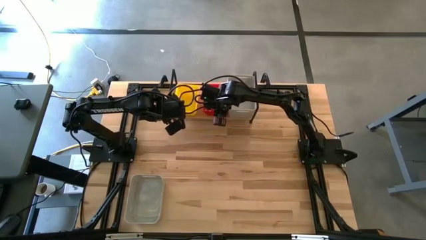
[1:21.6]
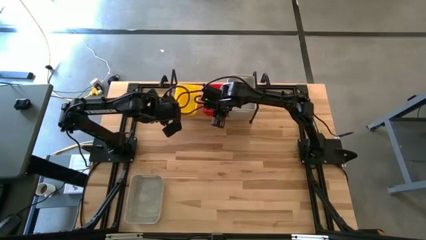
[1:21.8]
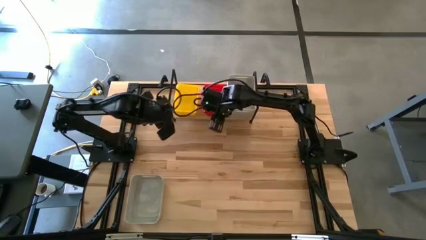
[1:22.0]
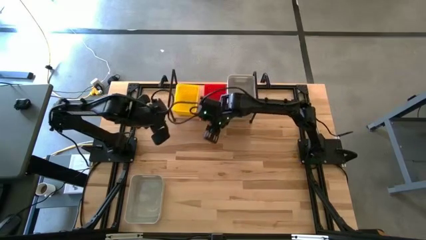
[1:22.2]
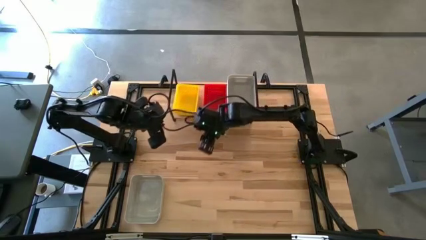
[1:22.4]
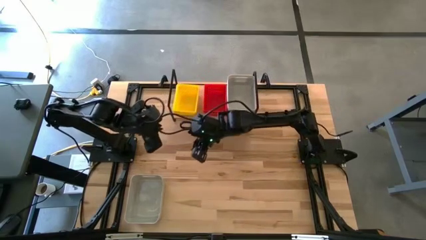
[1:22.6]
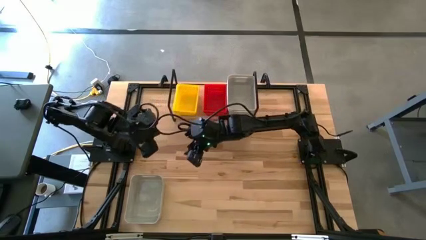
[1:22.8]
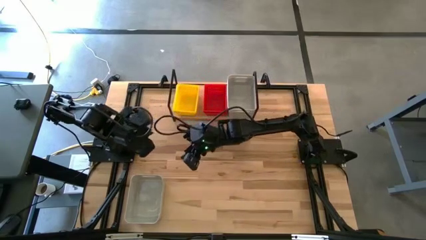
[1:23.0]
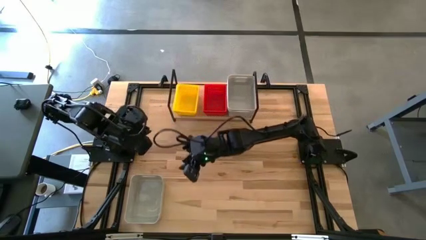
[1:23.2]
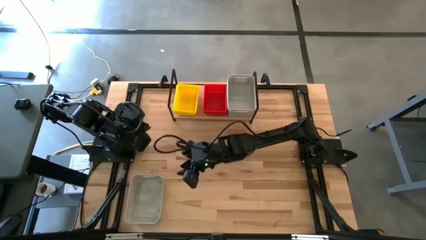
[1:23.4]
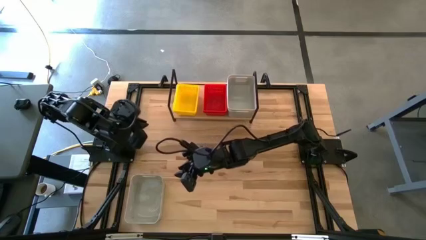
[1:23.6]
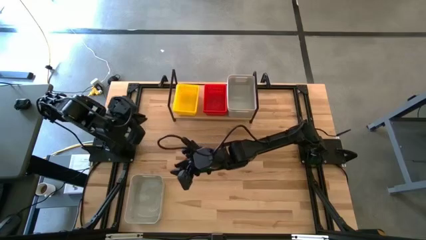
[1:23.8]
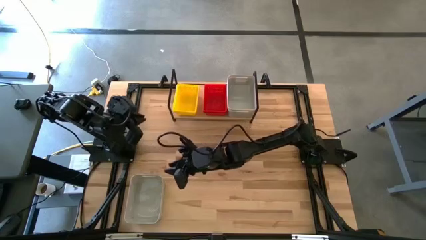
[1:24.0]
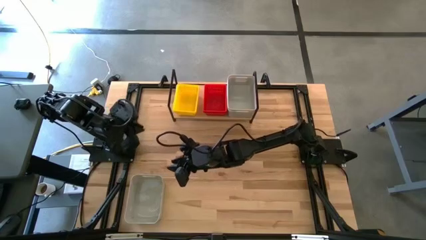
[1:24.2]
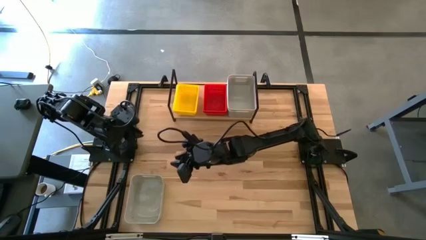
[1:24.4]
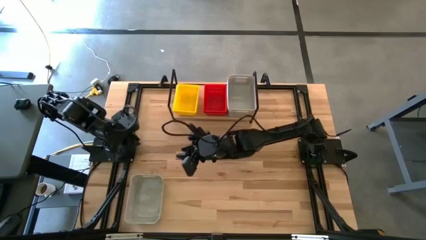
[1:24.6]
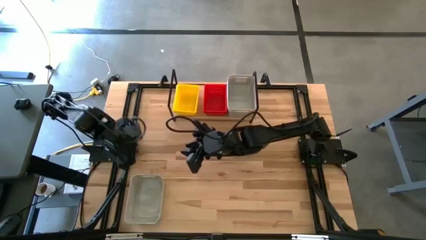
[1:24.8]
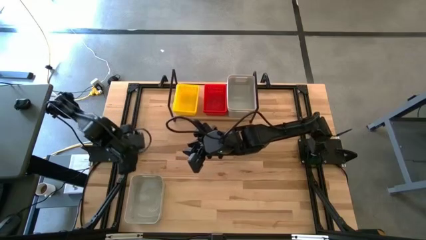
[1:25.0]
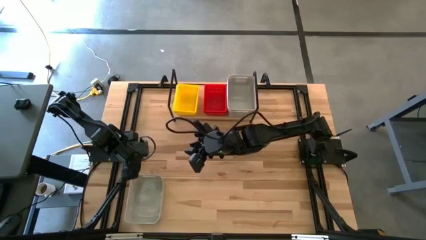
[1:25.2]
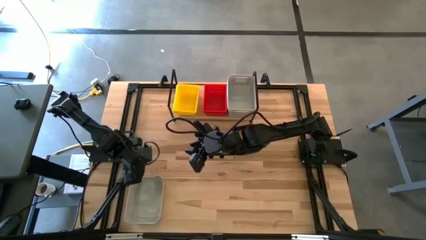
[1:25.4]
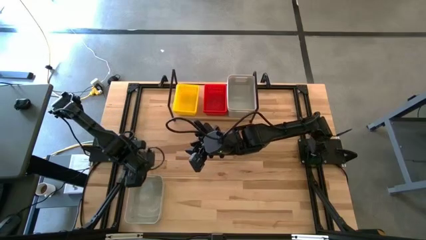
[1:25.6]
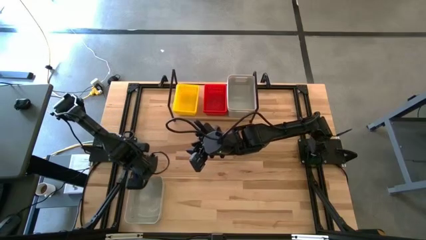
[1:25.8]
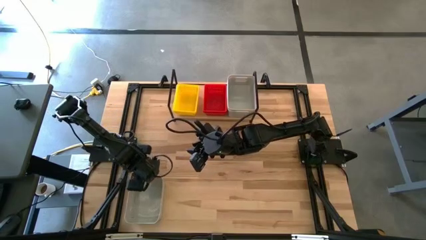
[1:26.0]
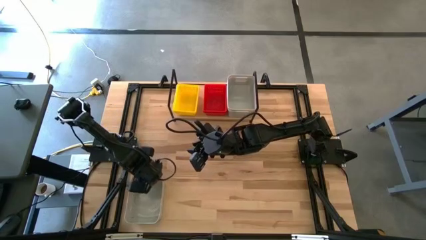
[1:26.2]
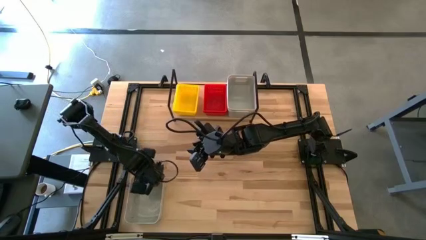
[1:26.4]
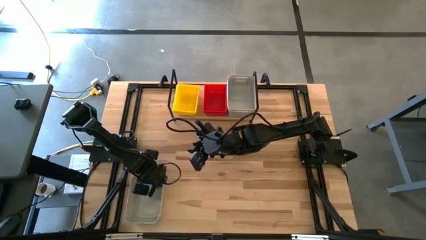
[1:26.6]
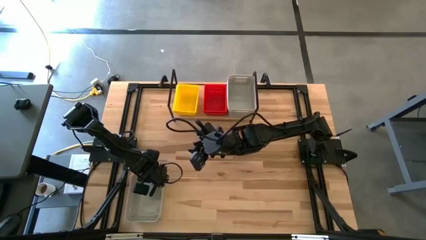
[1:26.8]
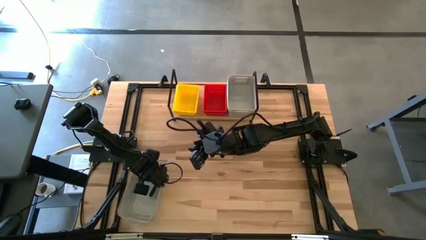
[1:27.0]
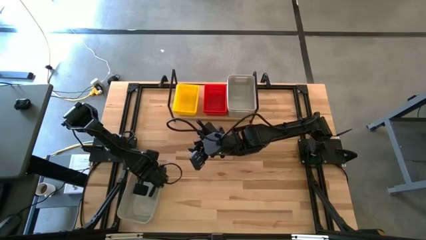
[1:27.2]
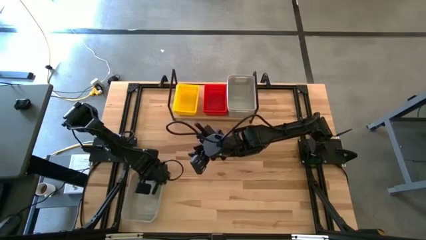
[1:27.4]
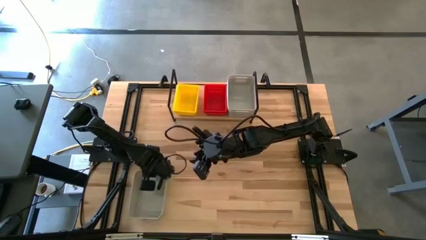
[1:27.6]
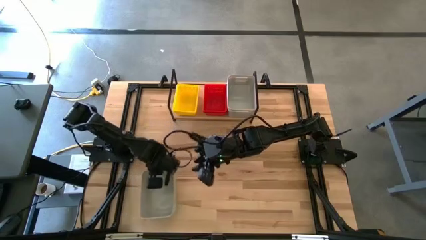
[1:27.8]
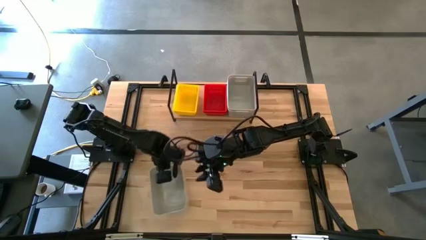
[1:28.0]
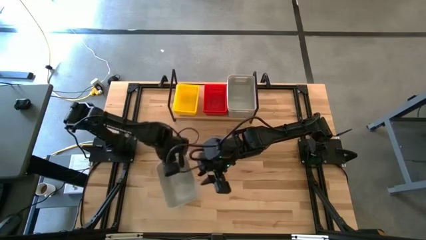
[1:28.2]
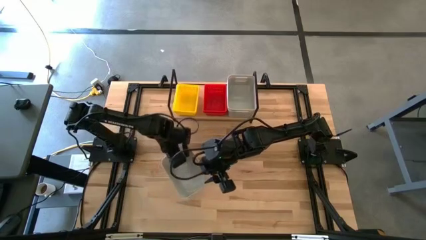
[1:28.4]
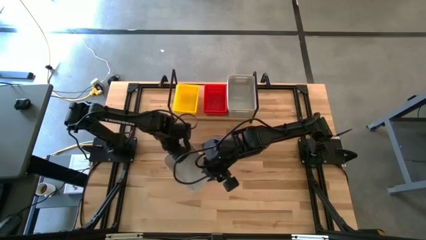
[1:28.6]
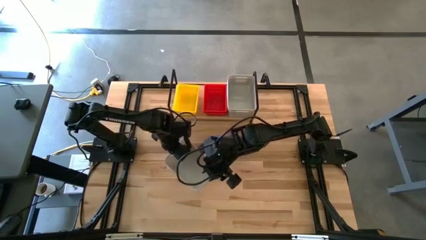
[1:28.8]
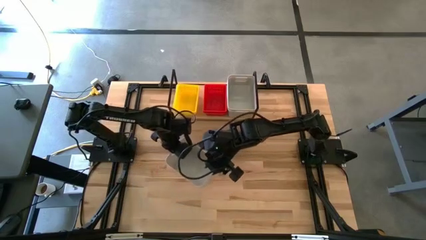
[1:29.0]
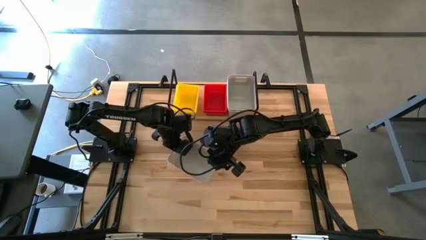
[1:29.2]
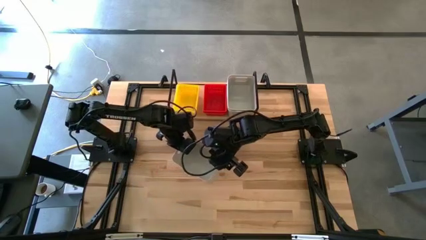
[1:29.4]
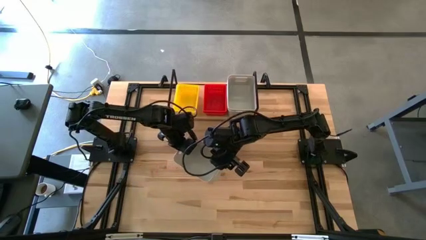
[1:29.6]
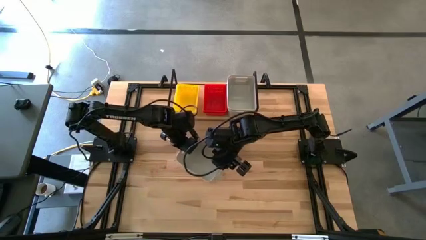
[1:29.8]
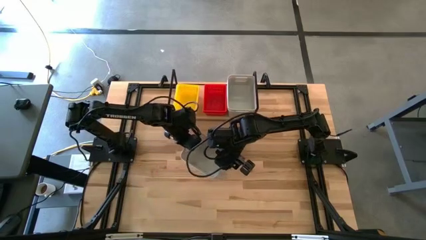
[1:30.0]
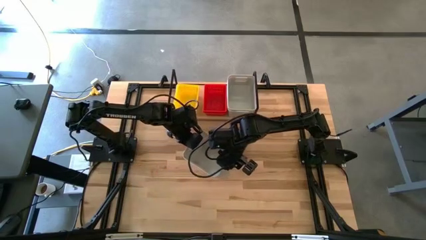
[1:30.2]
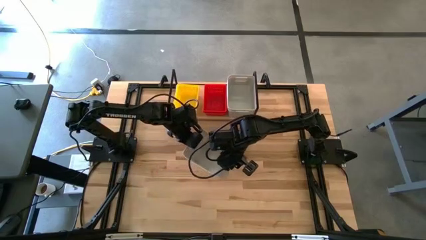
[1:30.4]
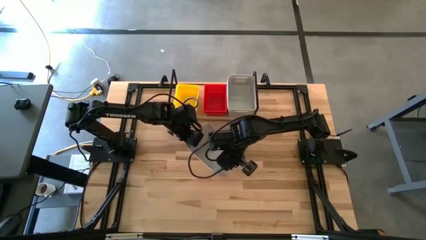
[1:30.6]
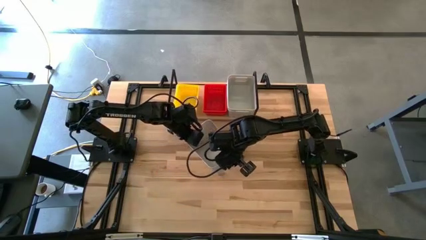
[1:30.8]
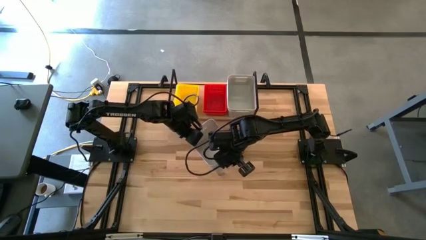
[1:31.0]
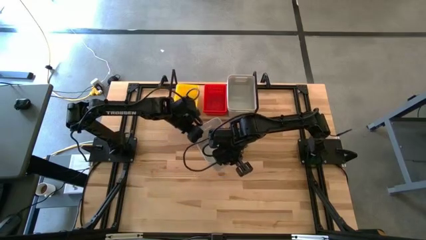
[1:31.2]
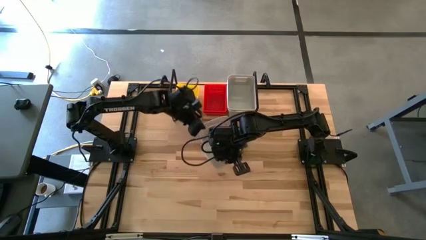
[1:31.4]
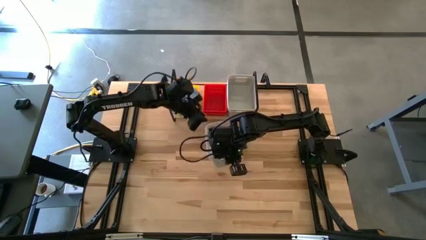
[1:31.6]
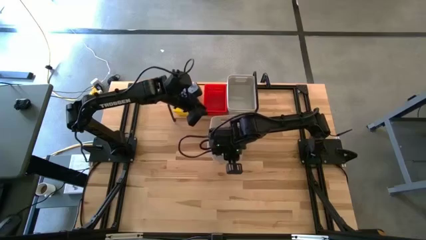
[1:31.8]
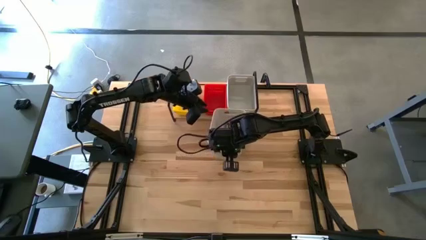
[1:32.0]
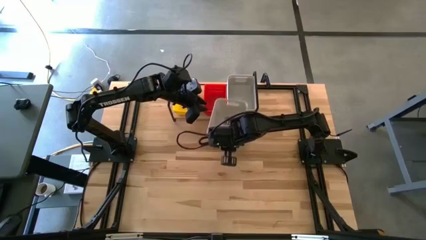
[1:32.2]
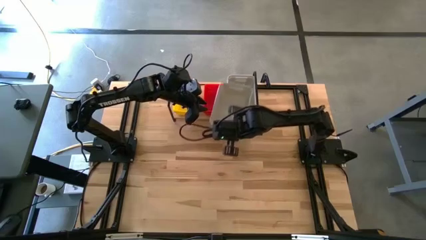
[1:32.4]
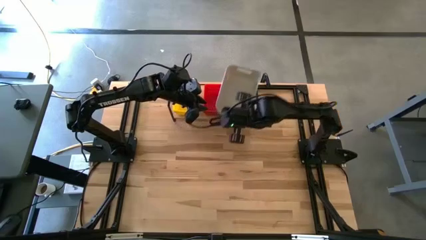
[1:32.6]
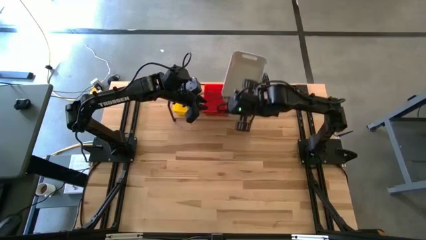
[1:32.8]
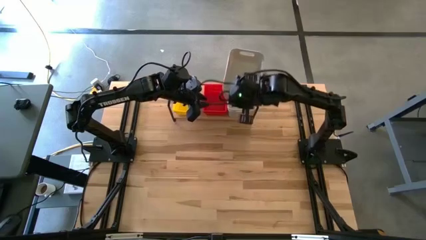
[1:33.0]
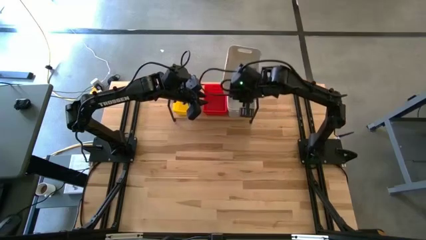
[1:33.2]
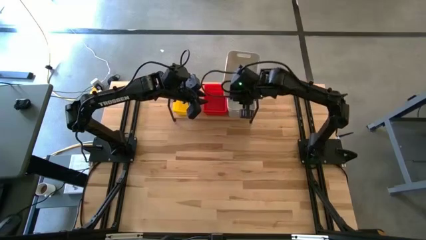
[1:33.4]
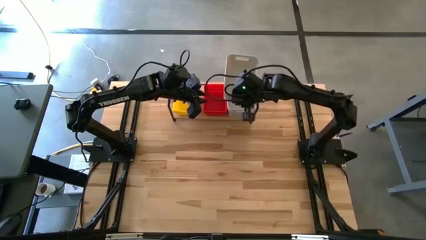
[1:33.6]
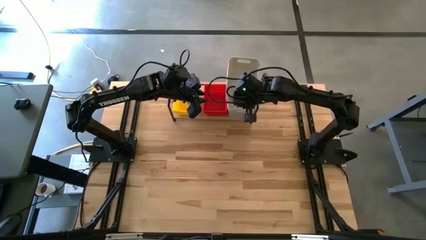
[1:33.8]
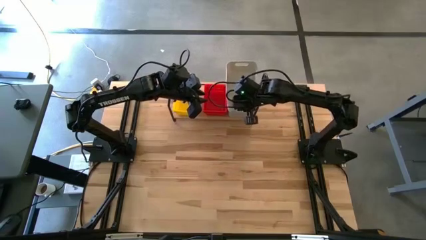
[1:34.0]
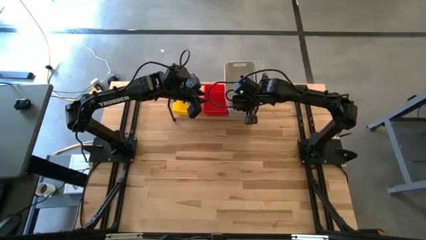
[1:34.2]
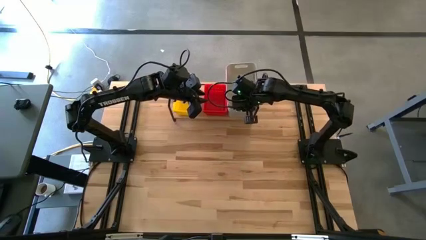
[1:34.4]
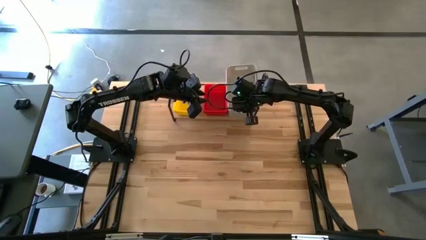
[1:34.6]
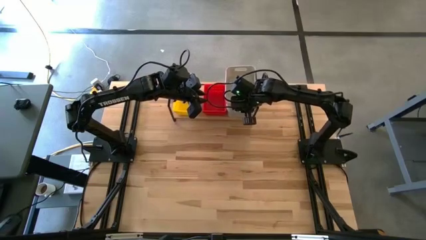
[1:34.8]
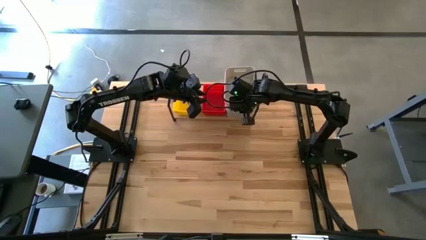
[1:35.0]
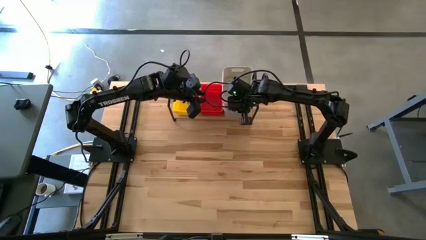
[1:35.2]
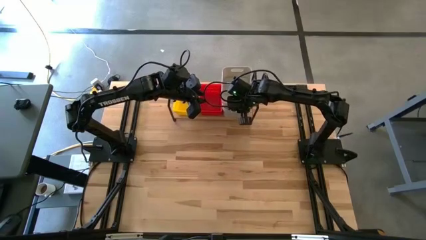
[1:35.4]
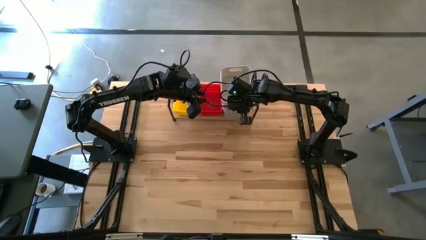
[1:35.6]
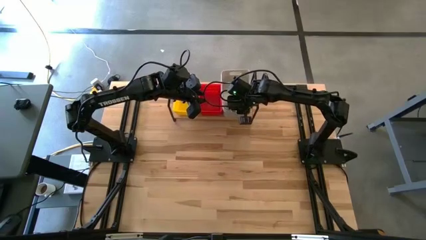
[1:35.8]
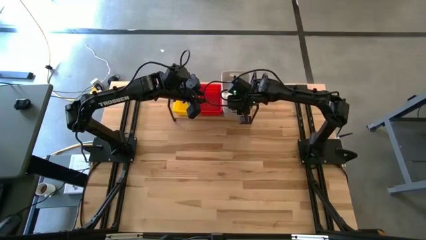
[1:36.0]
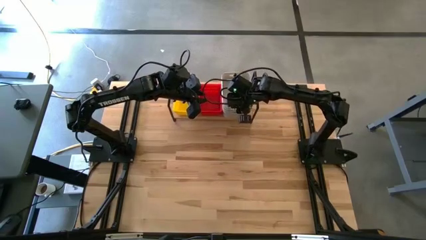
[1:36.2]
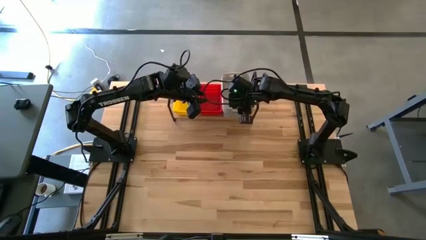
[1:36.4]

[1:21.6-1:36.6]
Task: Stack baskets on shelf by color
Stack the white bin on top of the white bins on the shelf

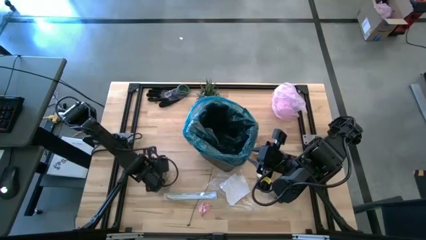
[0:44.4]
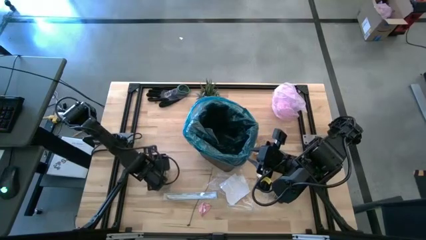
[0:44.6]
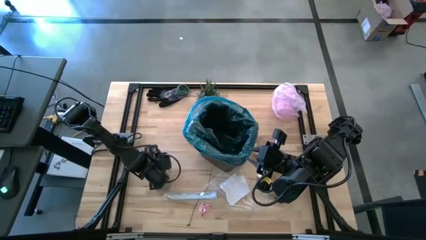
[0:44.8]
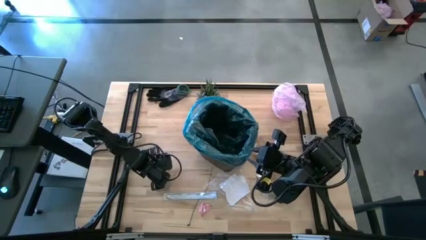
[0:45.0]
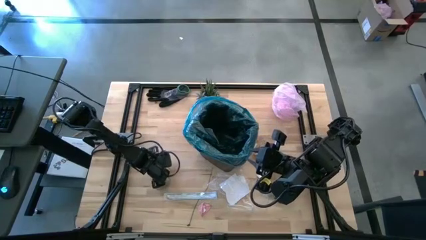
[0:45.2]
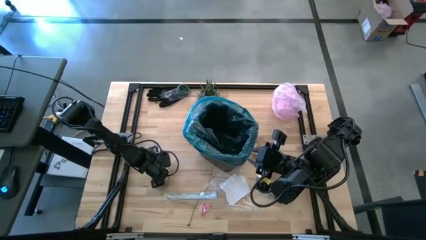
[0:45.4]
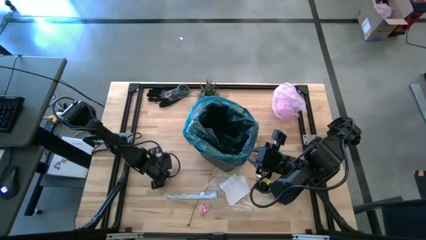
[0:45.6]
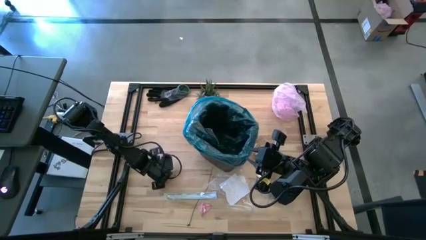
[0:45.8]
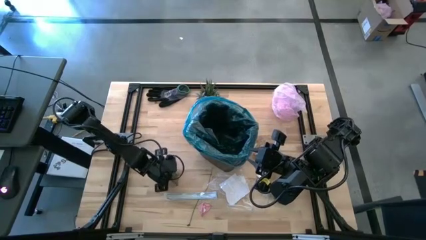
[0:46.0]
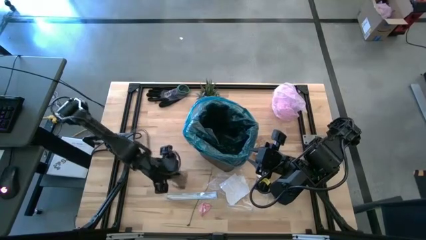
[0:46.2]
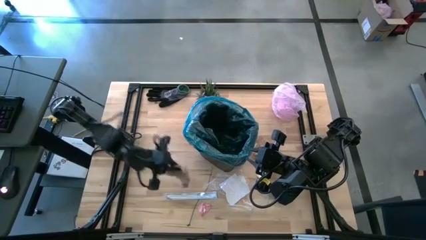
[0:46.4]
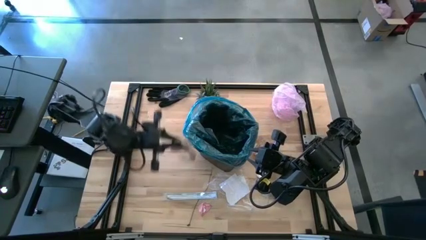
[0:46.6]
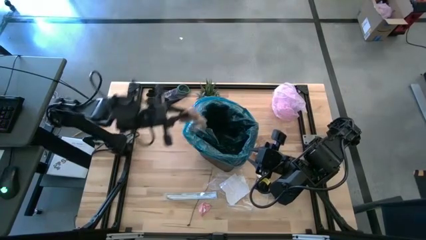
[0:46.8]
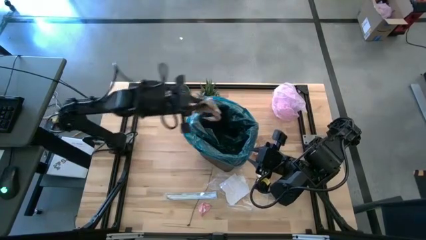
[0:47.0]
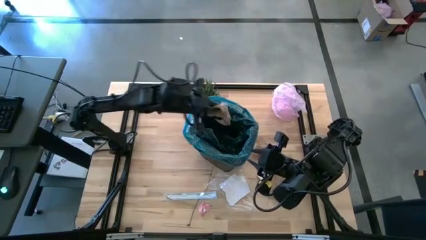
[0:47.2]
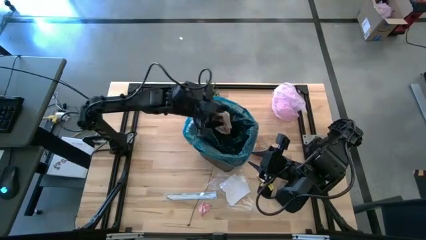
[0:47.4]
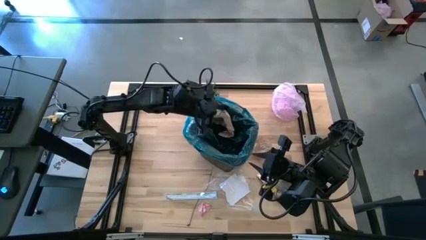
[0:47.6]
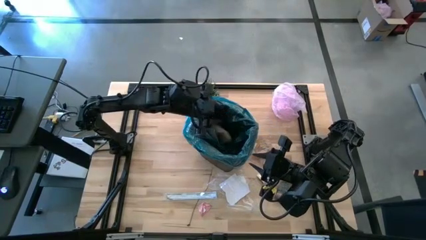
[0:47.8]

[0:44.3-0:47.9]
Task: place trash/remove bag and relplace
Put the brown napkin into the trash bin
